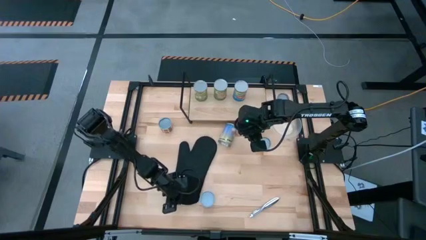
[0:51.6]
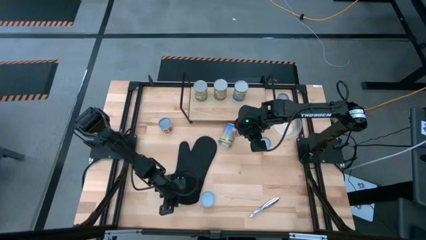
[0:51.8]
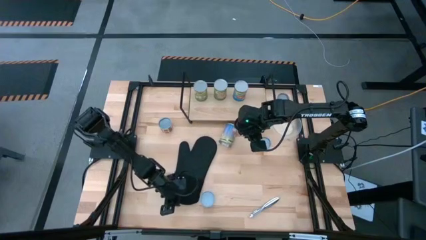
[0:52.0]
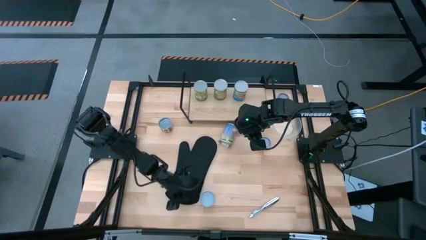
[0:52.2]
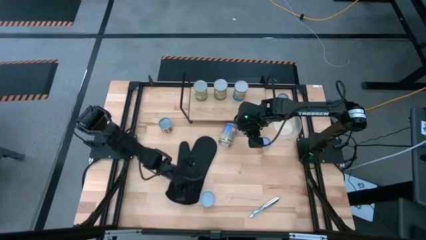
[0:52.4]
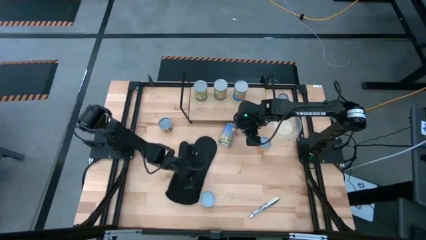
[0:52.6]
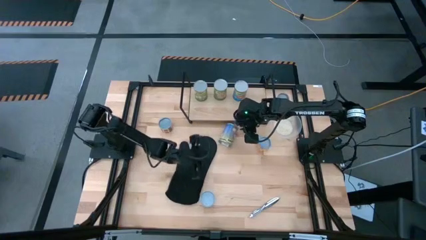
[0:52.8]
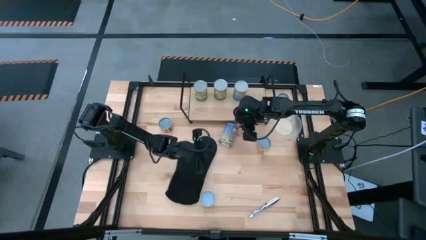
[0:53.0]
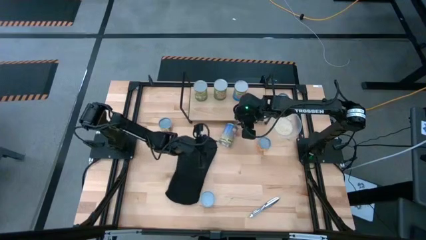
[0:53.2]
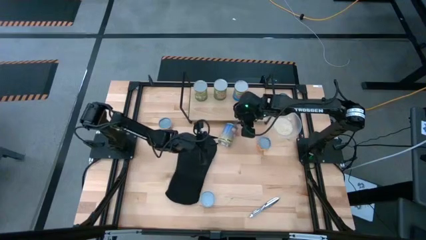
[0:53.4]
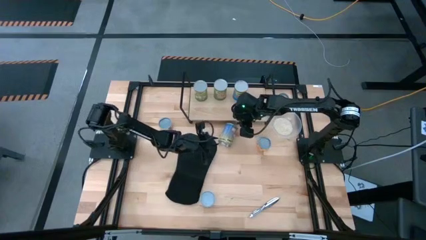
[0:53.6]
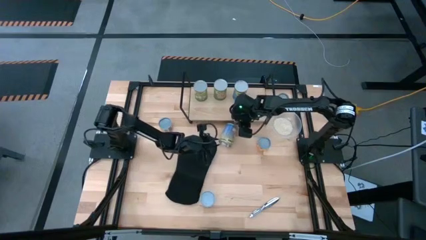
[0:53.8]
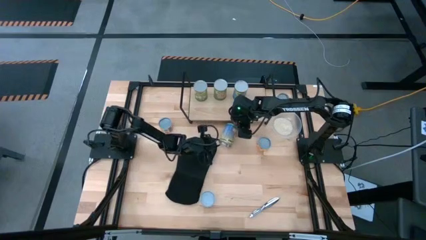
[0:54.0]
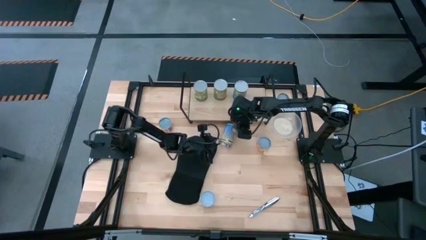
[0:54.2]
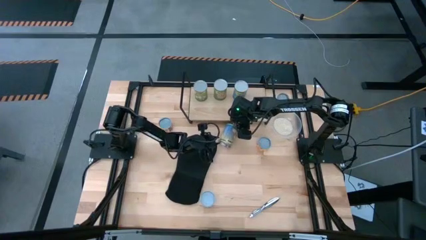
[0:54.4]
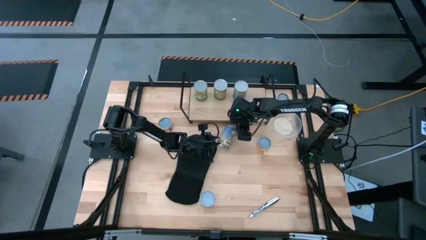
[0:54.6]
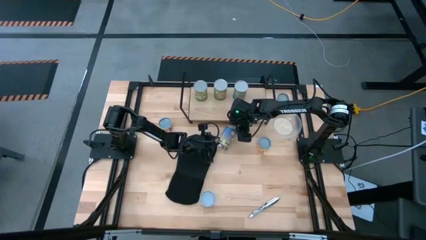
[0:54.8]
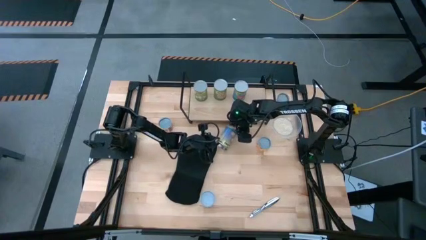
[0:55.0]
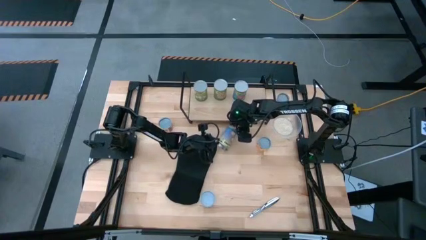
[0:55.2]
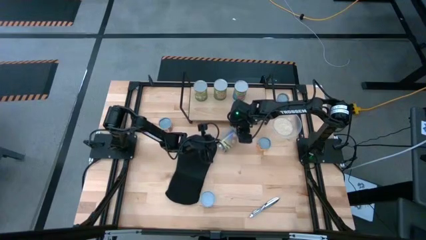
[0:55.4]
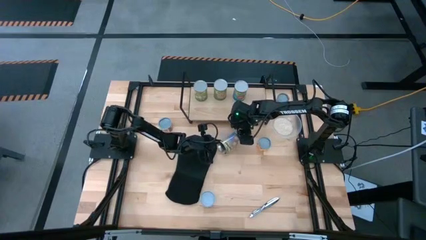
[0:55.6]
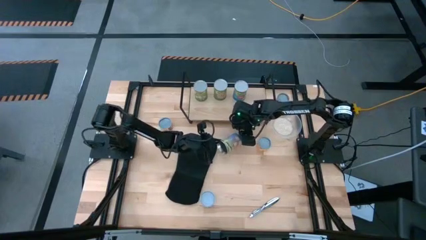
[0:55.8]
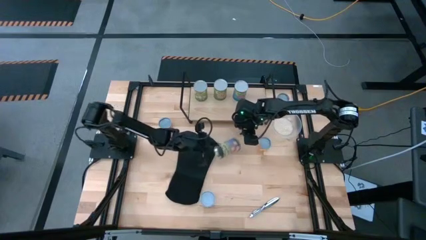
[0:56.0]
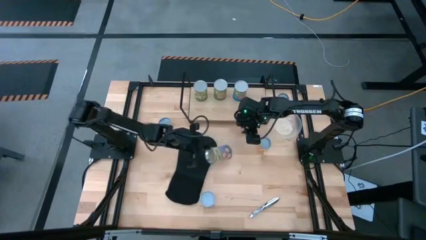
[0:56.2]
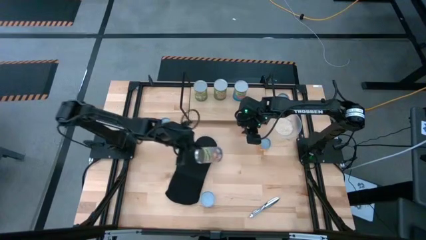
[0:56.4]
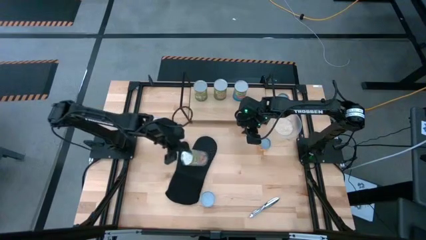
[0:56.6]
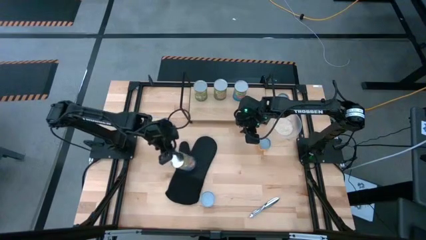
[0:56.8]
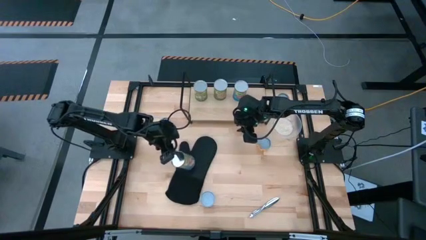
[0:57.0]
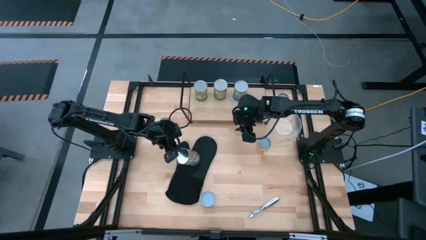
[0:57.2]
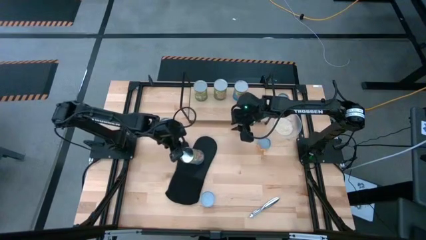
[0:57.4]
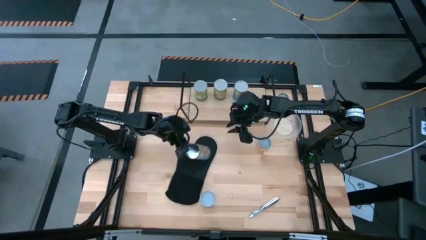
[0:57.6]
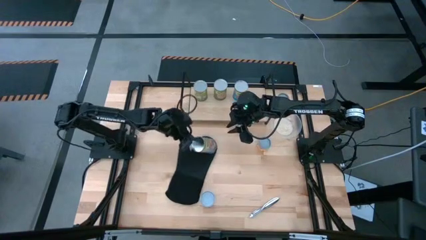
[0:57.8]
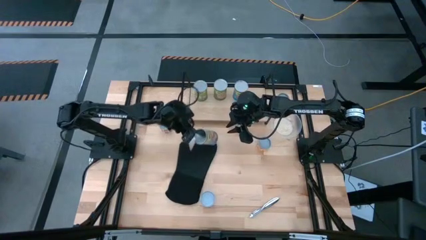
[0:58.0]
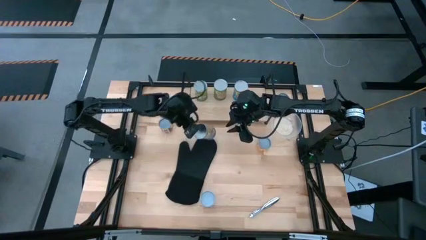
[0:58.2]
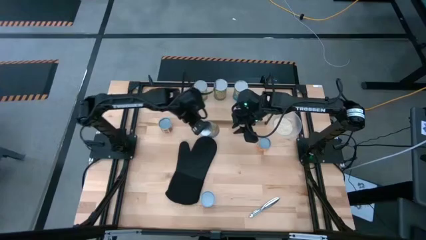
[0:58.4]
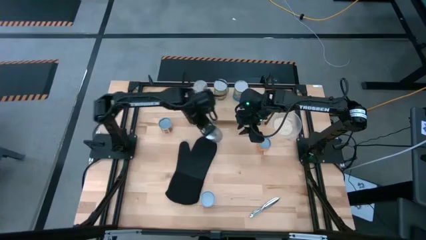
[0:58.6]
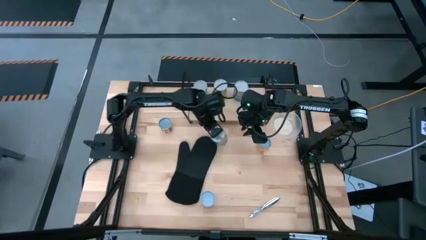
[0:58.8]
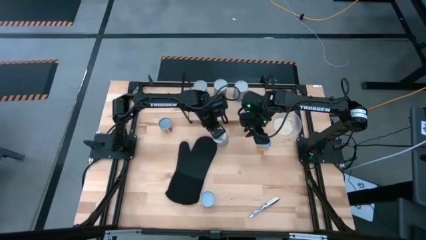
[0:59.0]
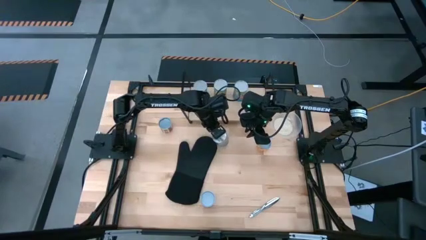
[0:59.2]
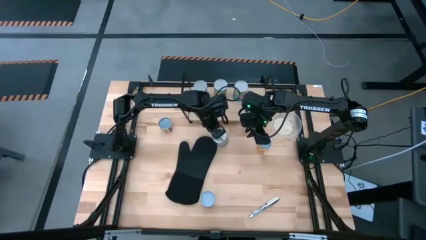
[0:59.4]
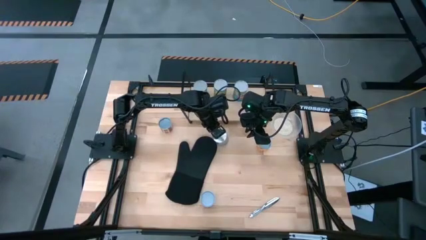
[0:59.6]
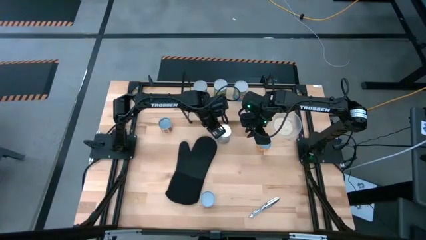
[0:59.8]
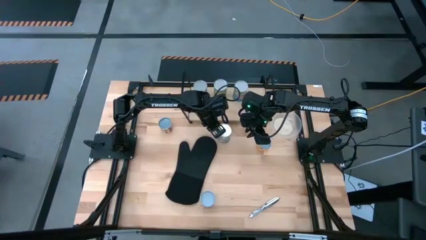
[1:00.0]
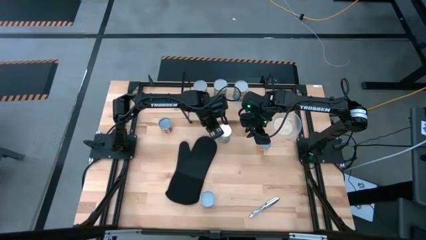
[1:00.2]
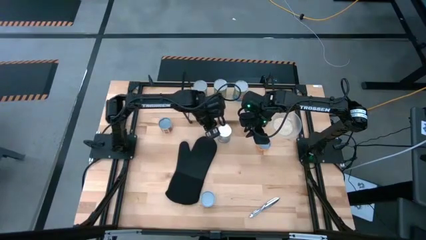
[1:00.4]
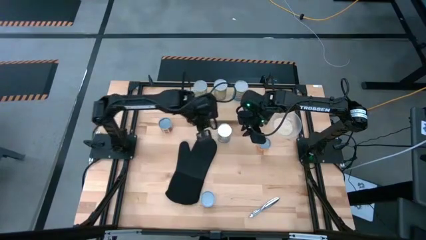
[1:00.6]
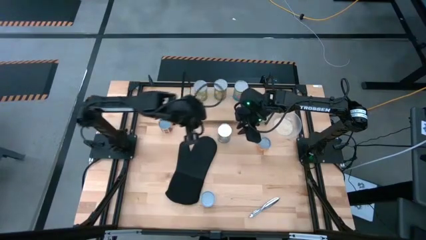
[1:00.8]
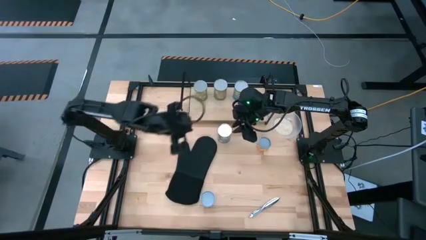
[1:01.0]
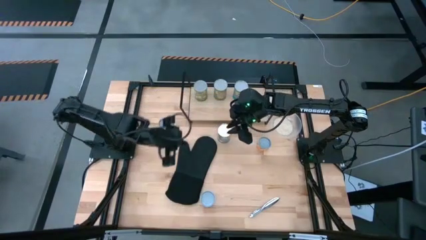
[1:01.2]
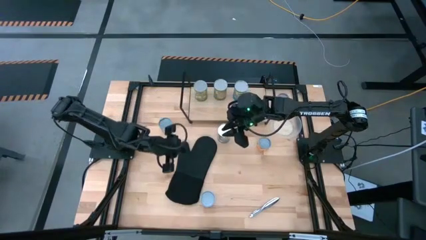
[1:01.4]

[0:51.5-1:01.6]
Task: Pick and place cans onto a shelf
Put the canned peaches on the shelf
